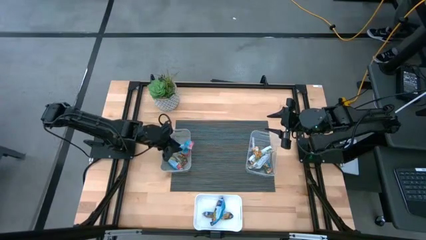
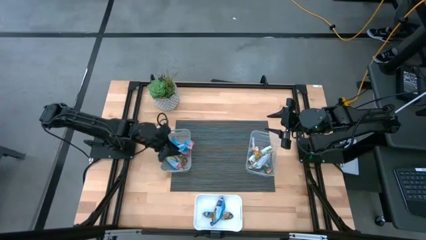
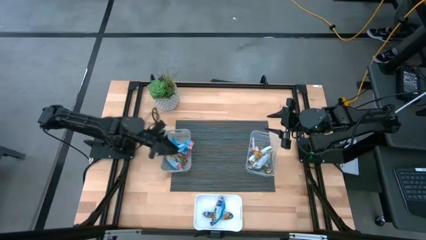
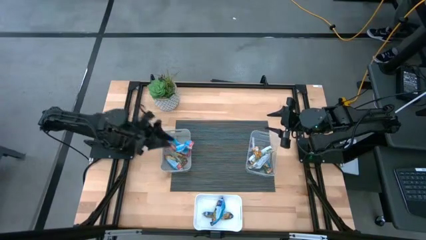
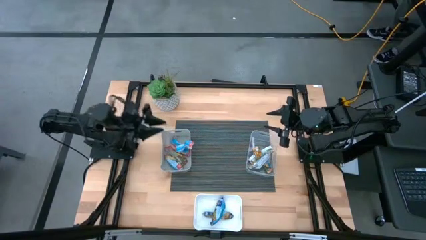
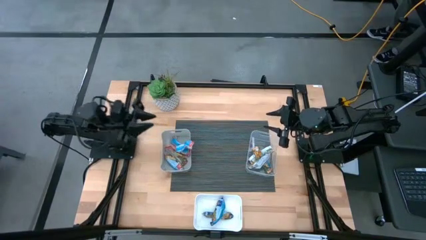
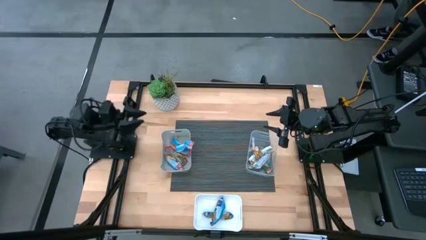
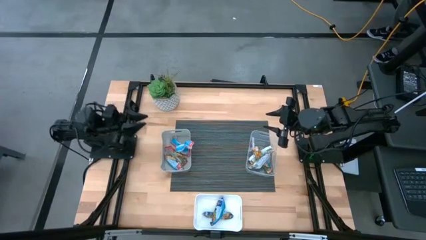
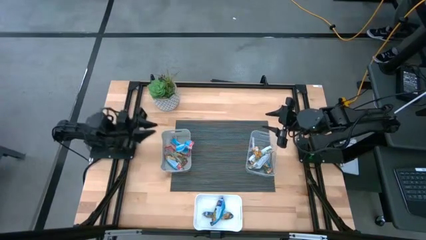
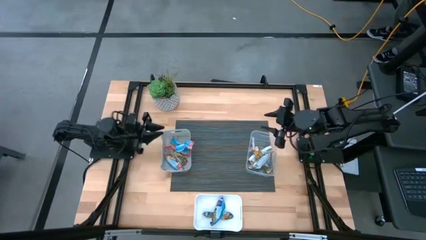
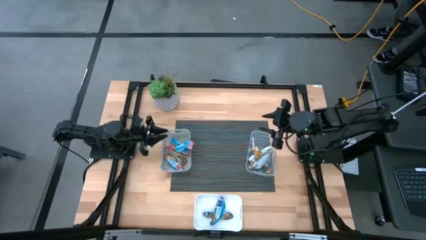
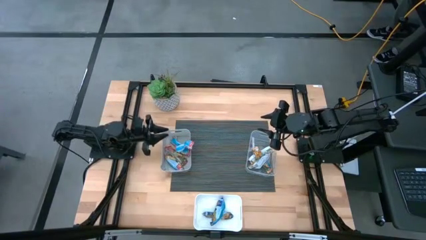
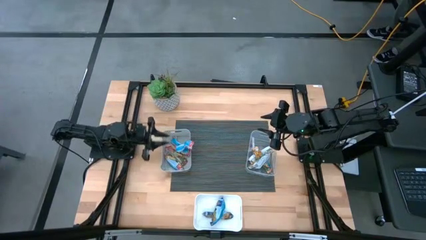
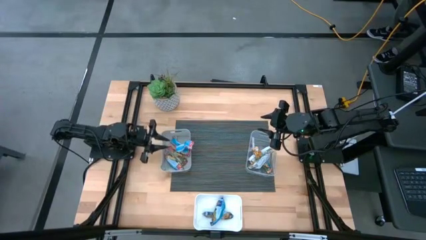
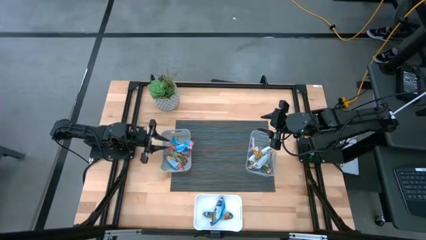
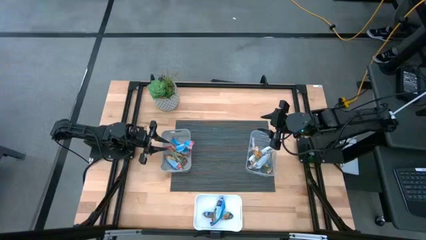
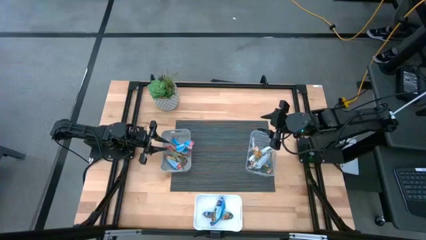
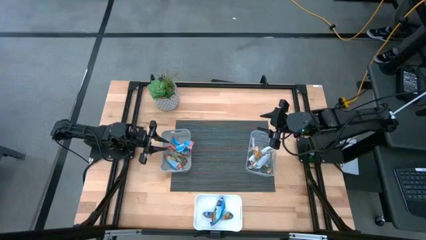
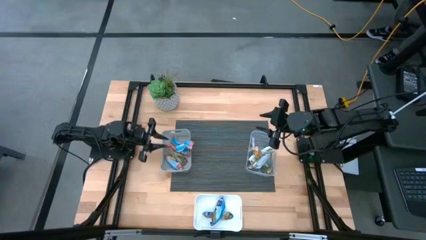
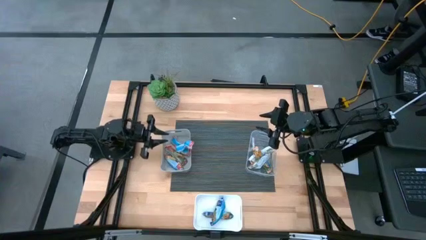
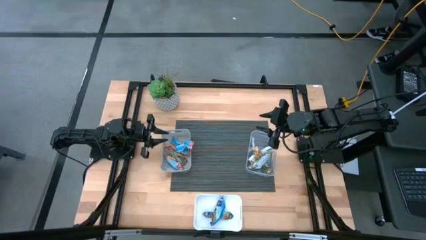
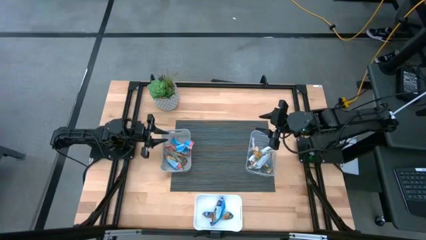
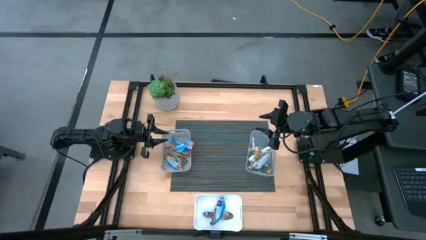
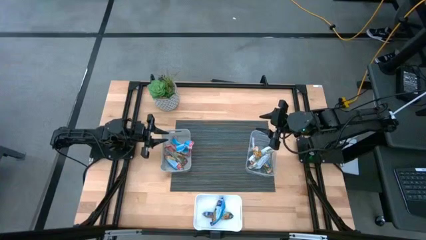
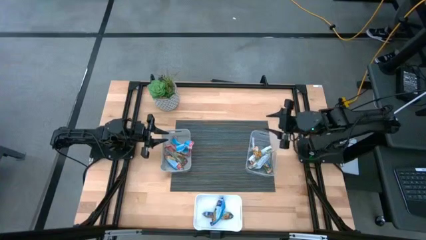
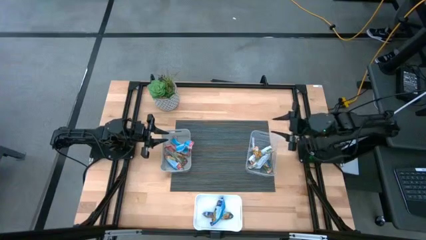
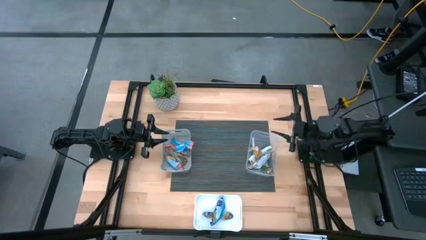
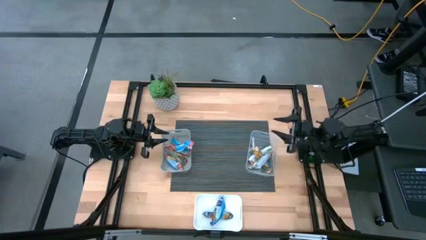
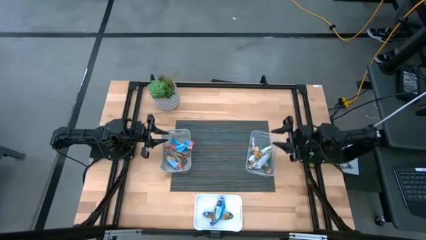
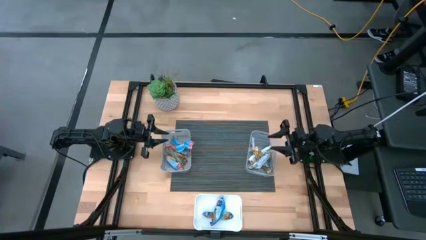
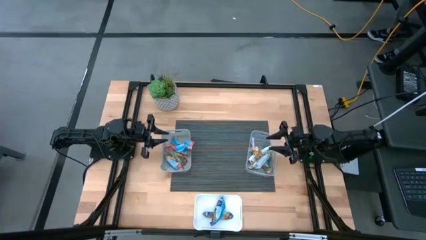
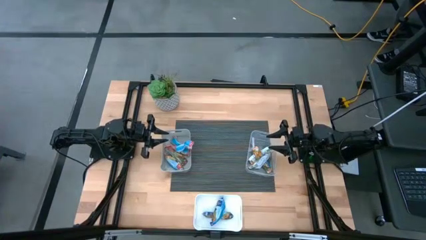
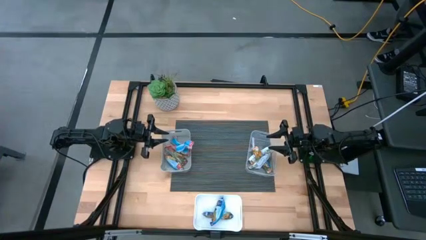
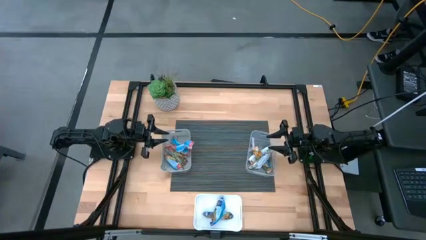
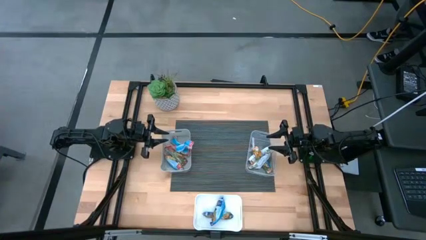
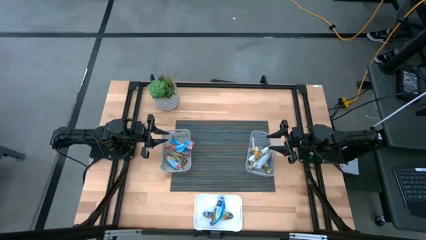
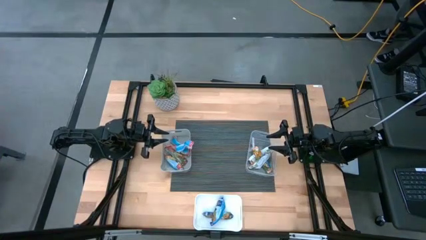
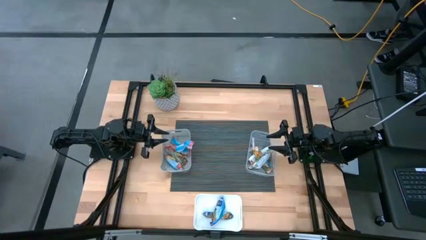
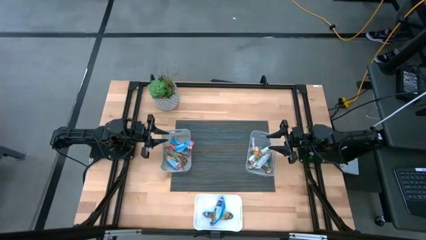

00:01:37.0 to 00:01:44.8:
Task: Pick and place Granola Bars by type
Return to Home Position

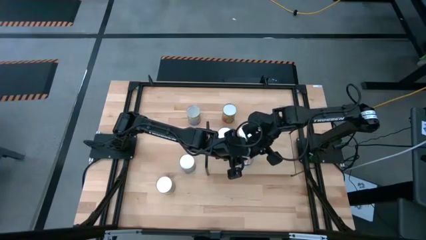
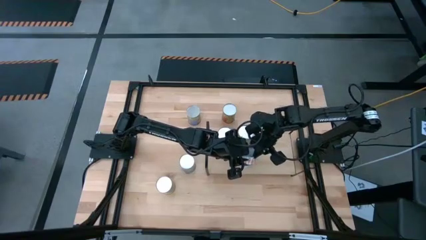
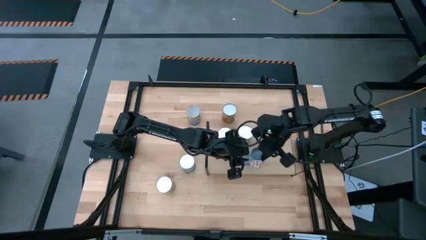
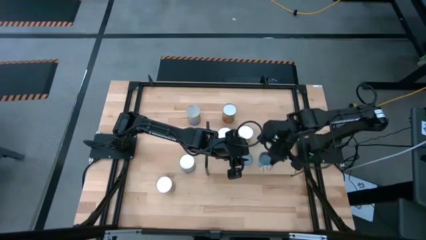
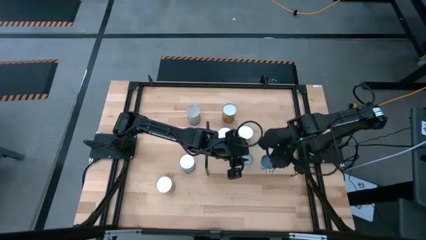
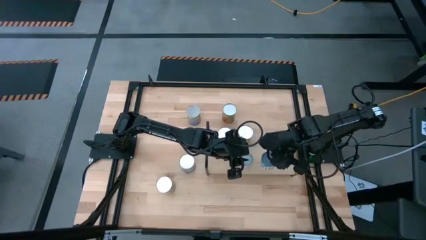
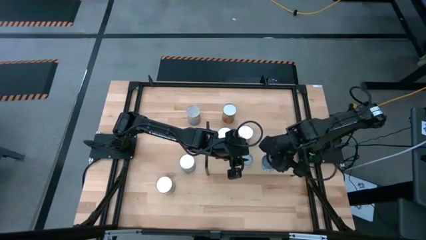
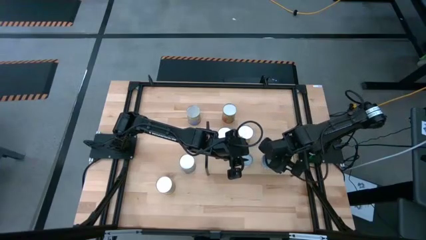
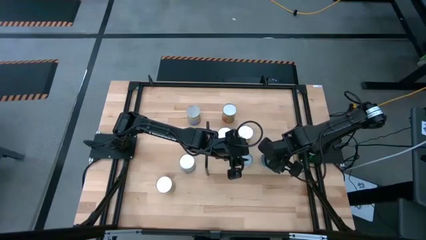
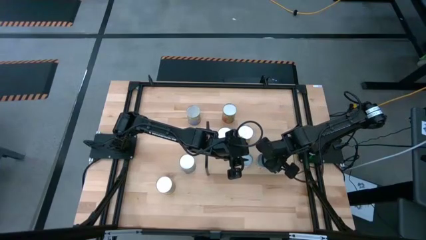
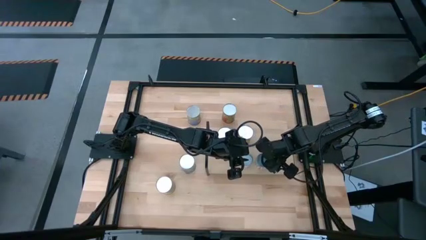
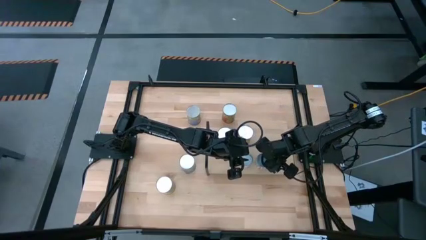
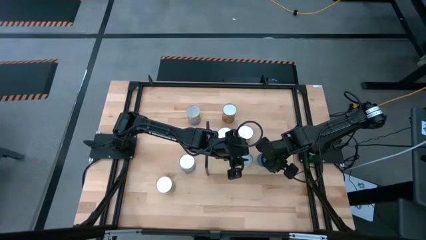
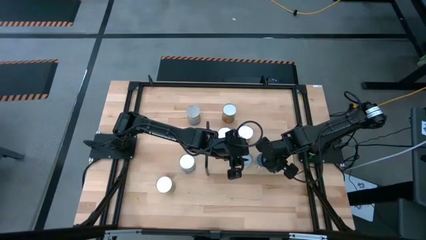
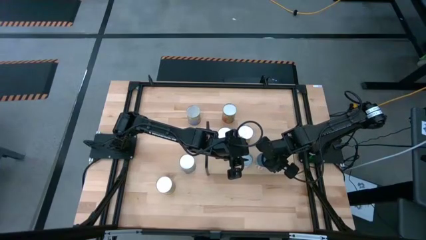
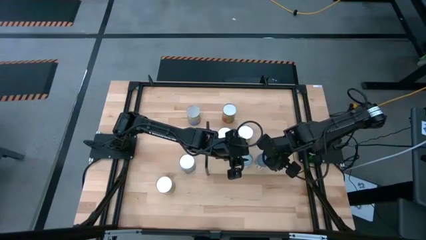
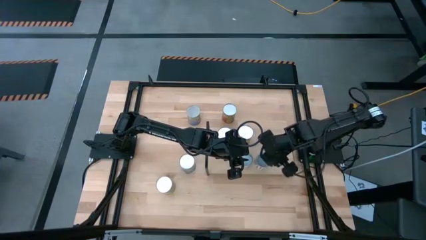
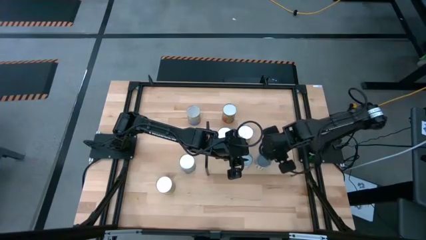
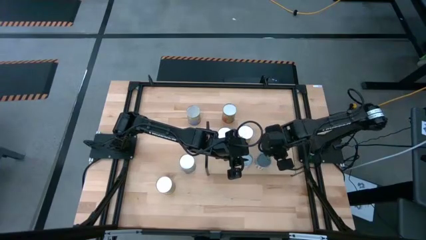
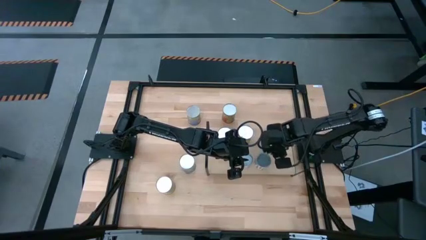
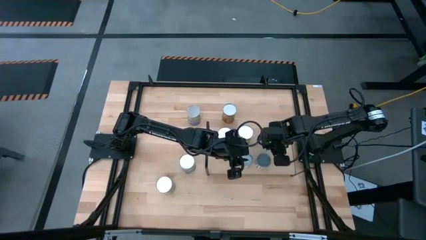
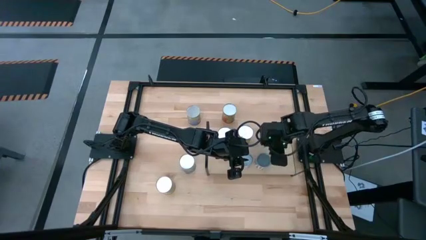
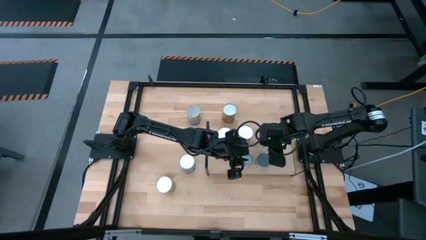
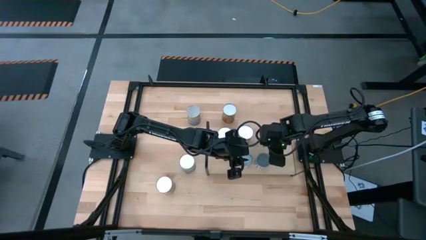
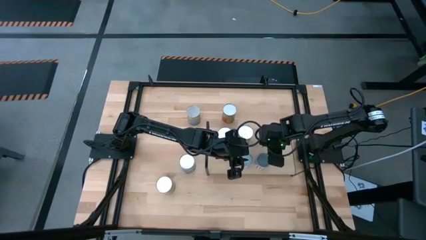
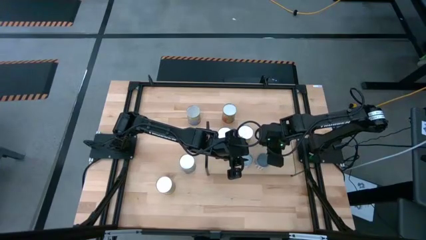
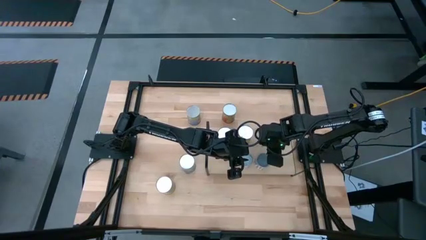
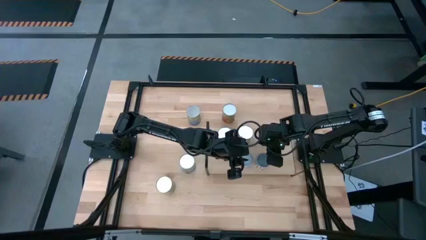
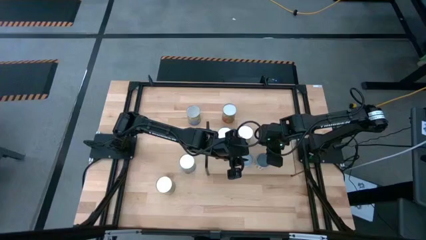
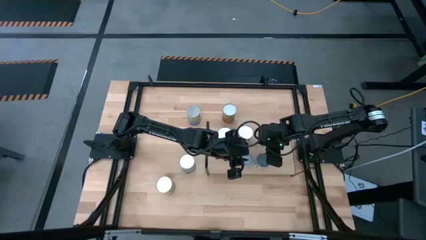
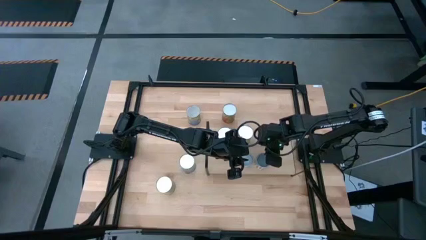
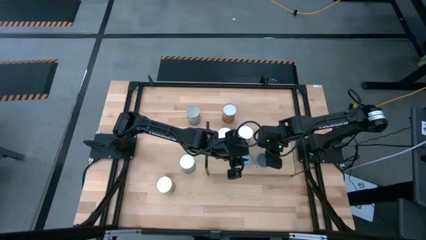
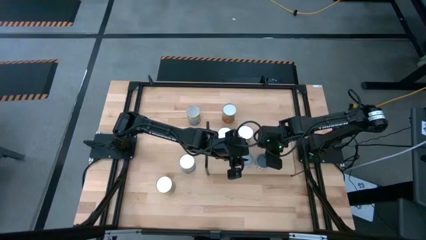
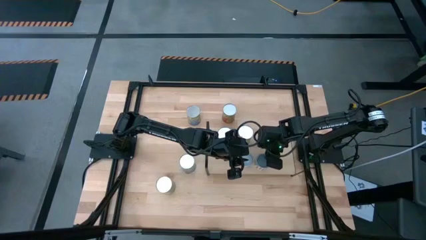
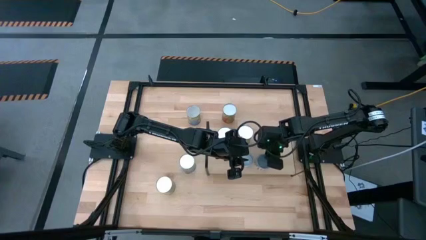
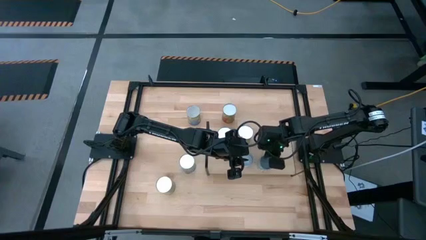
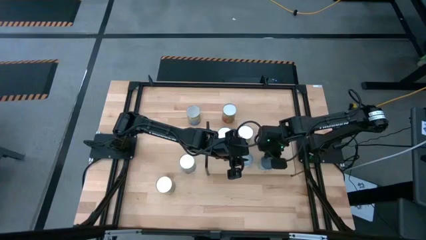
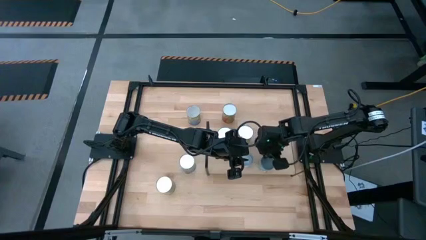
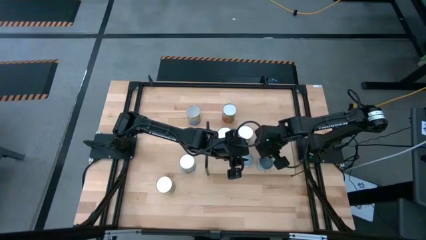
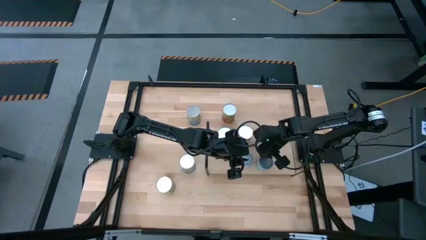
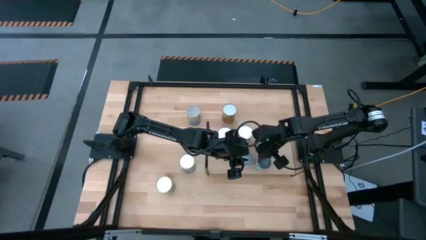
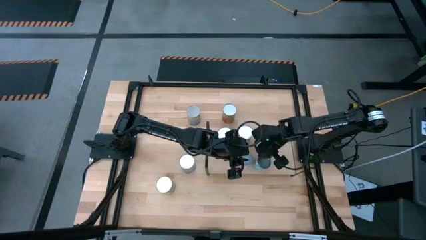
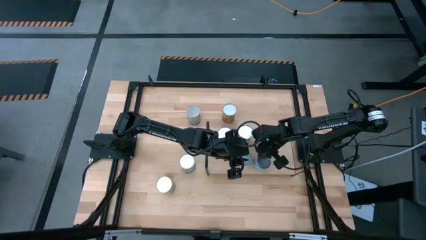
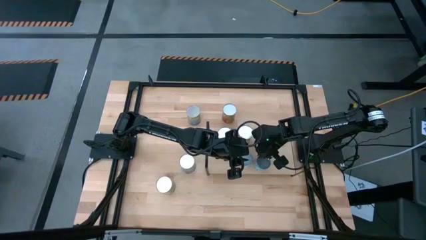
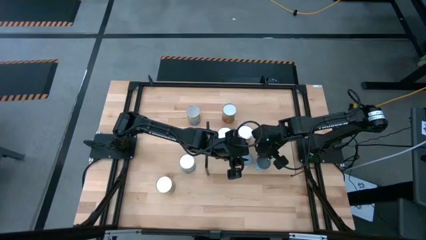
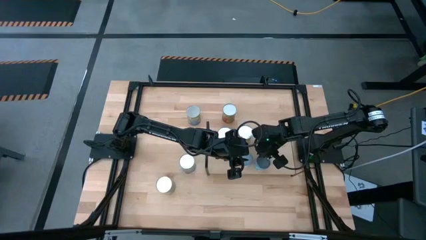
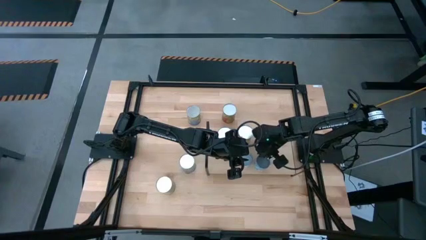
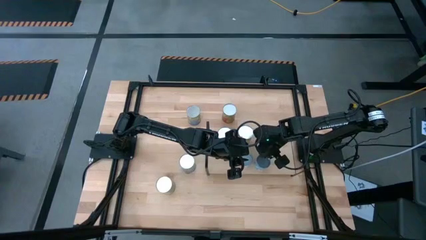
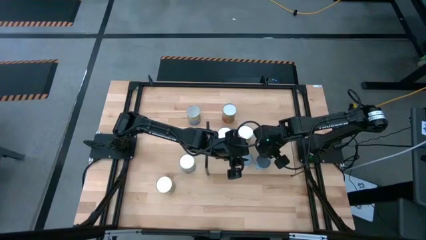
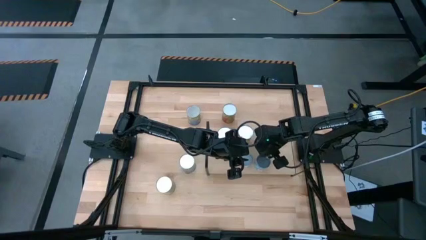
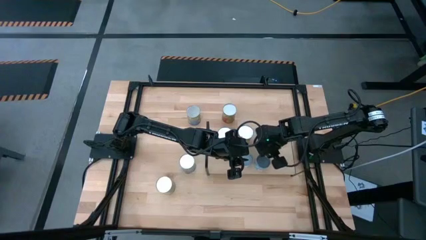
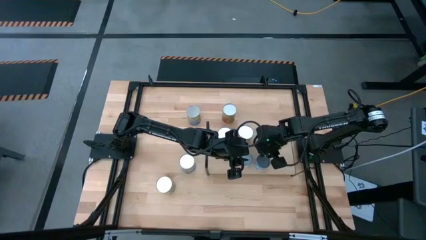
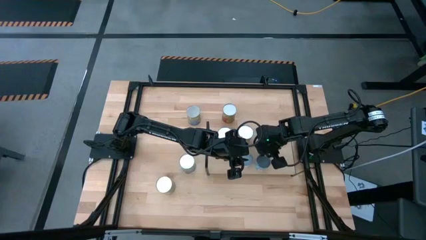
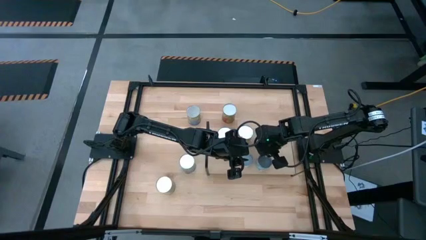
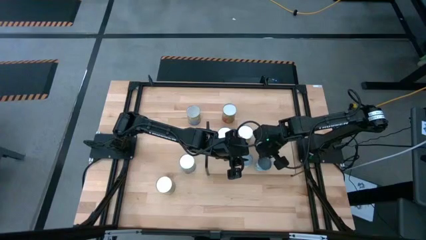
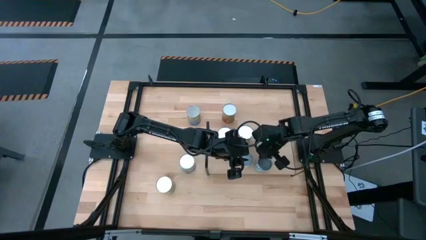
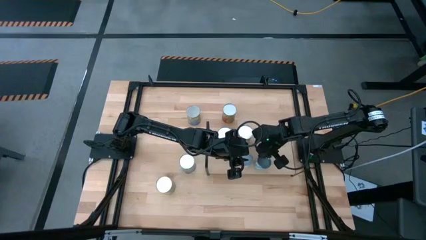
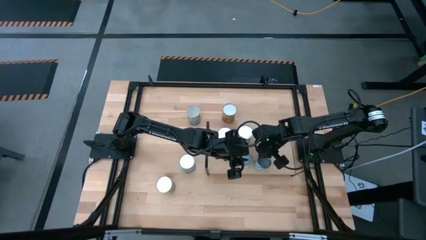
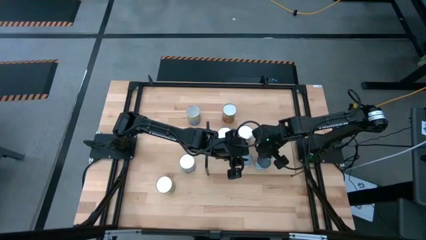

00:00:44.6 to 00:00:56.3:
Task: Pick and place cans onto a shelf
Put the canned sliced carrots on the shelf
